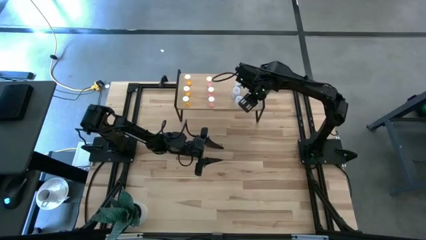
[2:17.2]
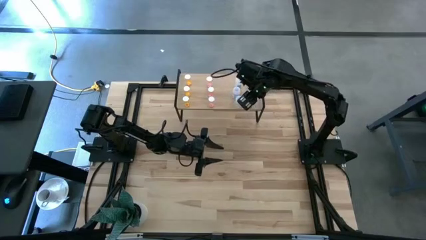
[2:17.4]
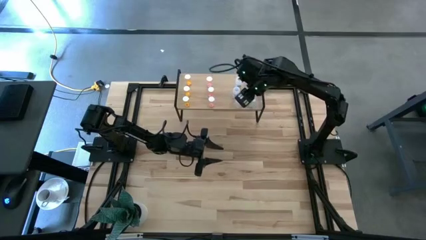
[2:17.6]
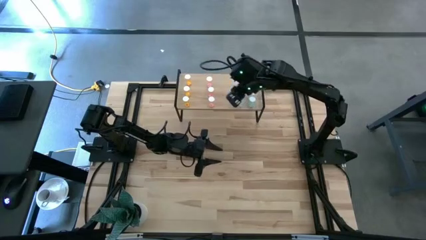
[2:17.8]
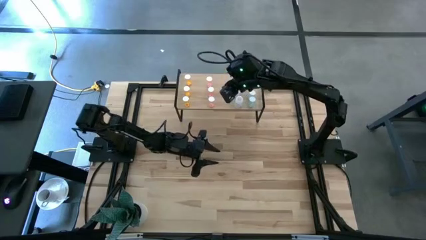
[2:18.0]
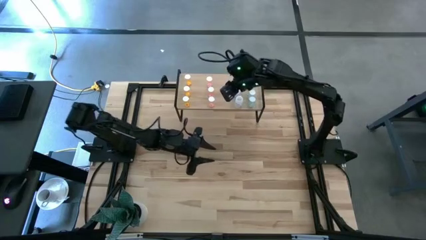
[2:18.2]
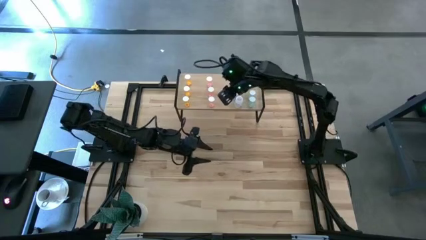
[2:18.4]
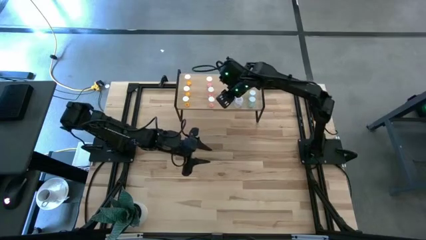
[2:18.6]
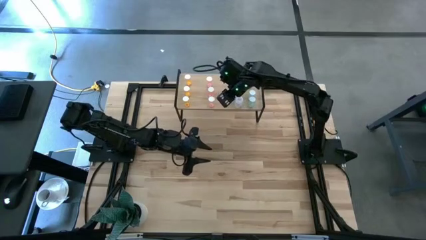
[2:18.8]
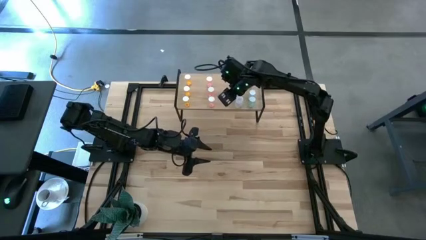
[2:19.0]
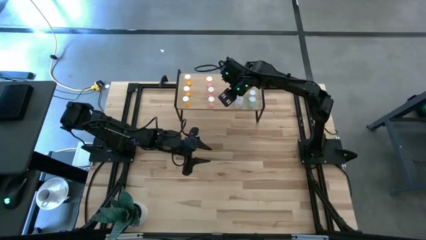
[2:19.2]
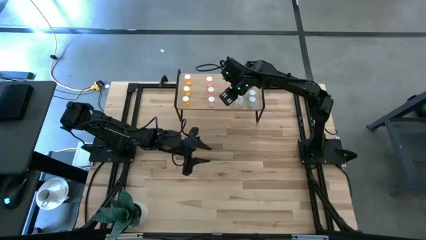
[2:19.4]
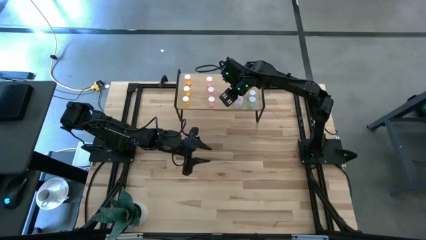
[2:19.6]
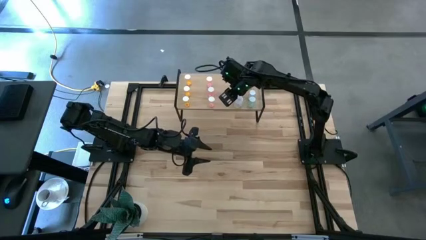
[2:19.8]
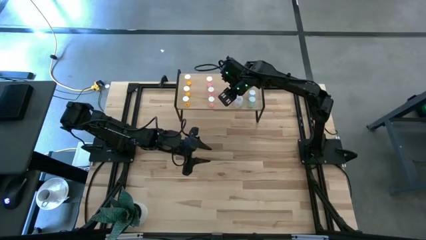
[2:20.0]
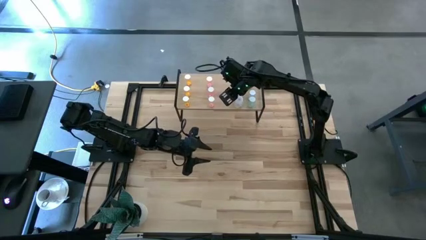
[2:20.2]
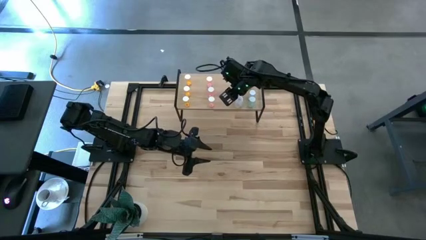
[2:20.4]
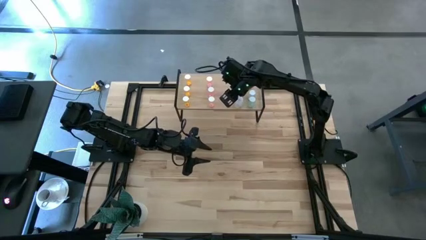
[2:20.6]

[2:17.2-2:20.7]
Task: Pick and place medicine bottles onto shelf by color
Adjust the white pill bottles on the shelf

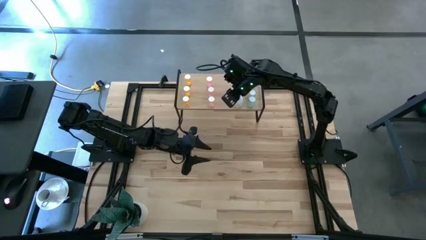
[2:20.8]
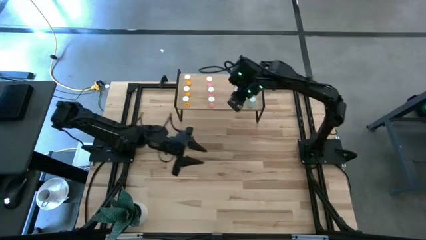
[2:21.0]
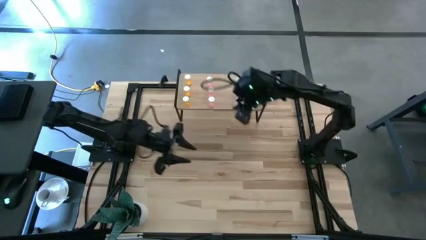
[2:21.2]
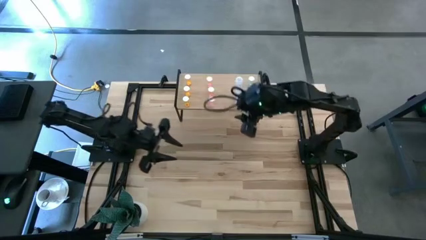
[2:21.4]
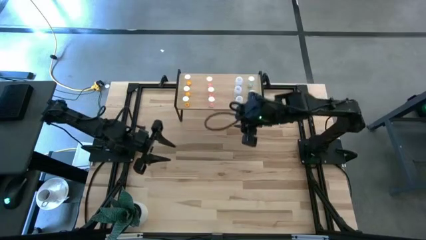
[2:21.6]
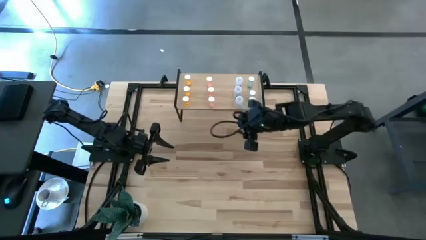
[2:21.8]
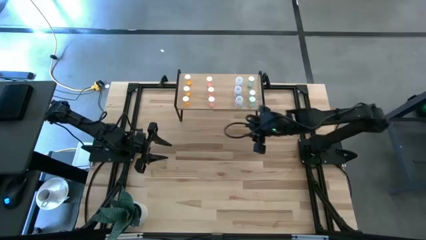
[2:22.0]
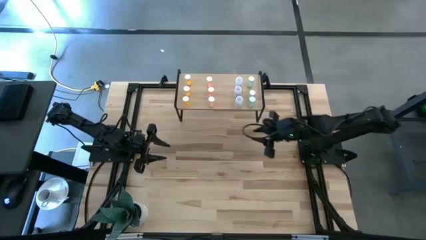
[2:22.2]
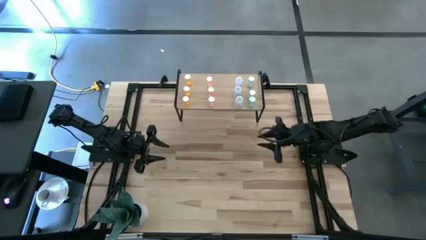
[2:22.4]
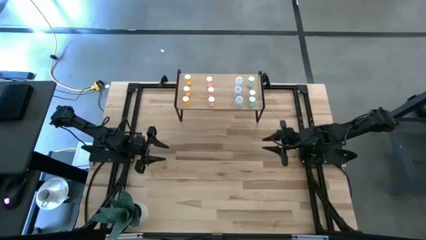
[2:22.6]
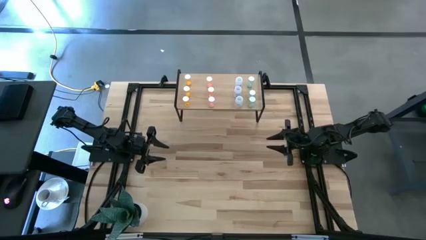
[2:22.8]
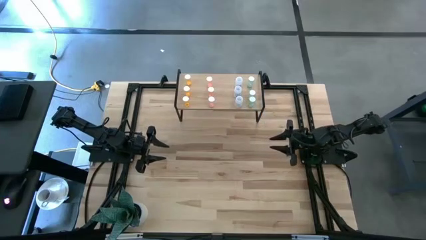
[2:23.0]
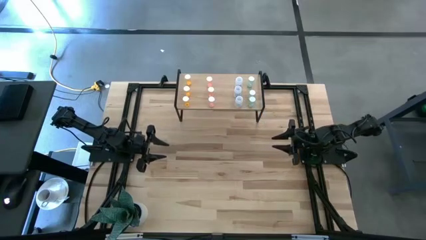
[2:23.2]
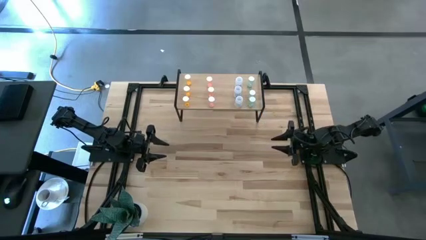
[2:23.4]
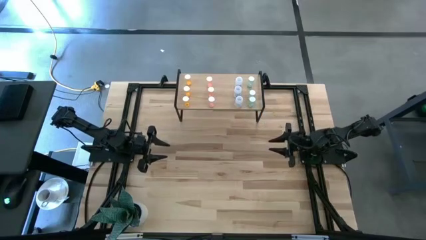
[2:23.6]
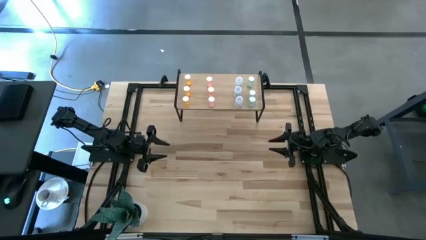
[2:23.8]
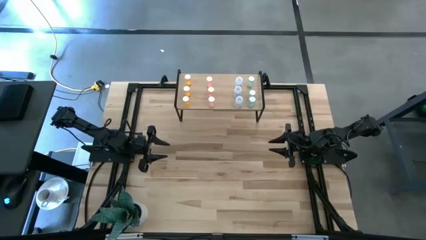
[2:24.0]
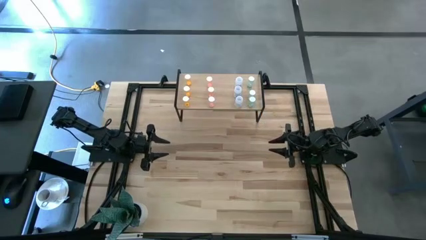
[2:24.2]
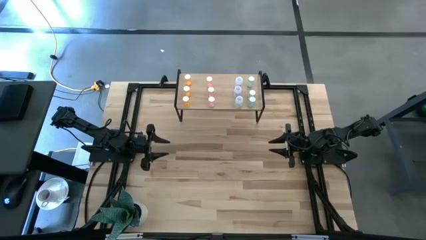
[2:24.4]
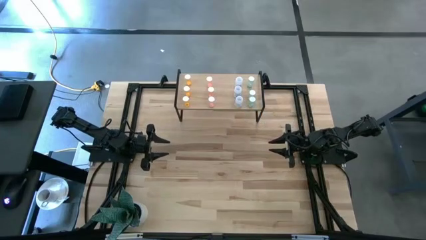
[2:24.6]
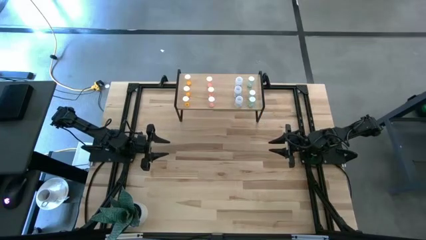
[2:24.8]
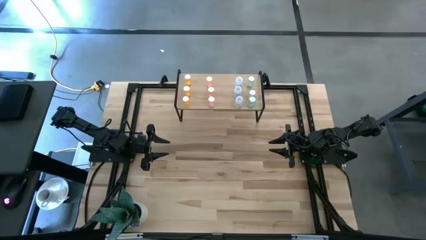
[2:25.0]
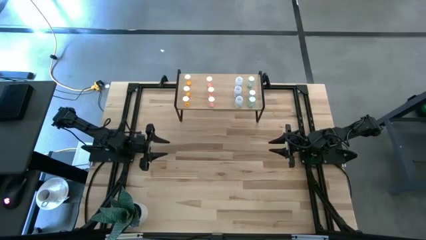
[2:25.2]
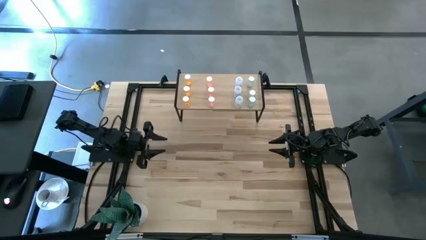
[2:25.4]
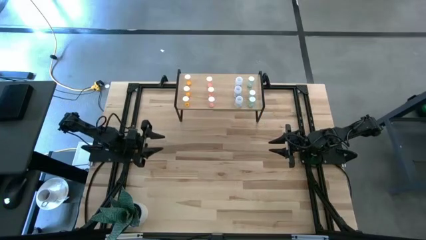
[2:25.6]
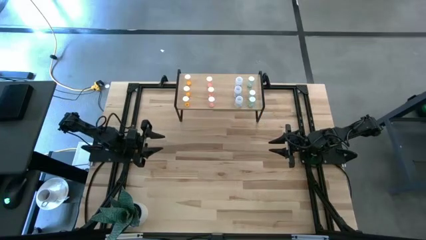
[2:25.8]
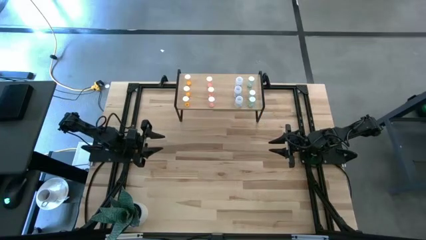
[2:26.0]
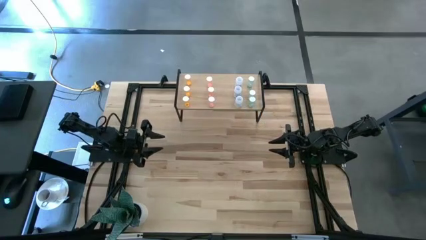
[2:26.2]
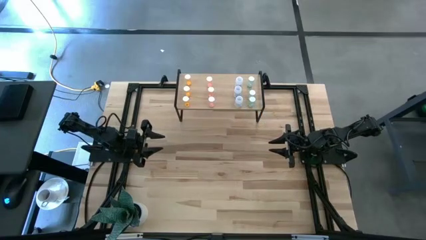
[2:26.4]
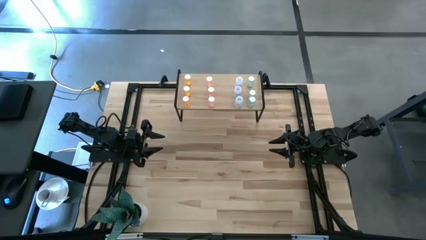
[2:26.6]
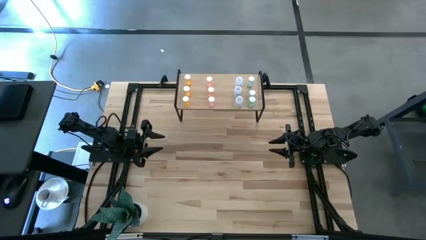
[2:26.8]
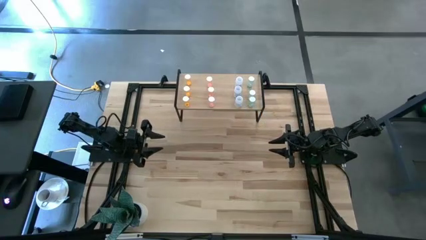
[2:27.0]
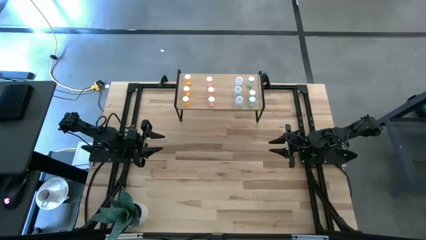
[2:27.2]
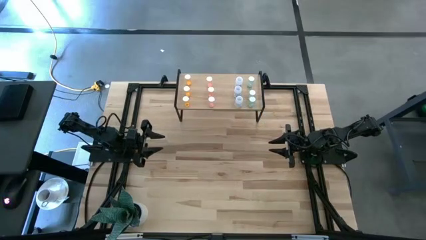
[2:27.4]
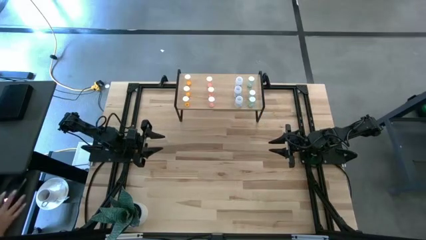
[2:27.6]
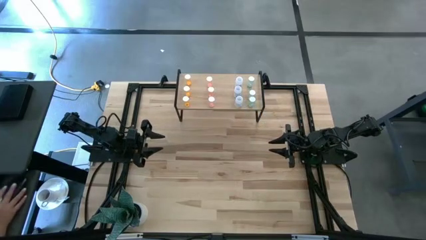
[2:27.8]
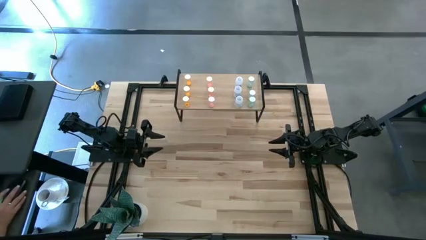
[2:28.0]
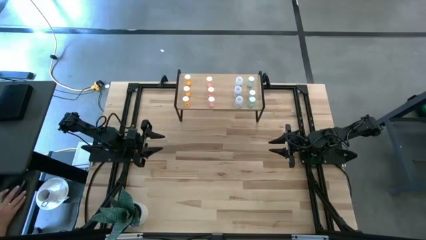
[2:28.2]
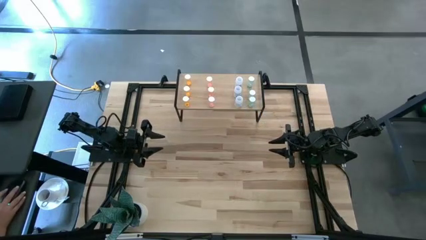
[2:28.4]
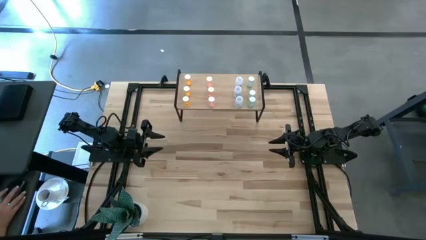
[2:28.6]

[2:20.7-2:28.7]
Return to Home Position

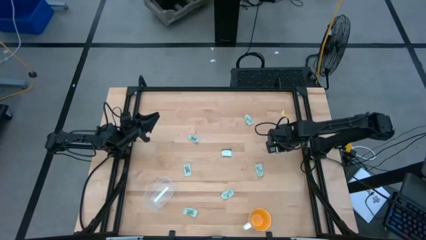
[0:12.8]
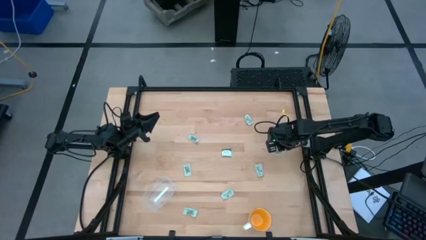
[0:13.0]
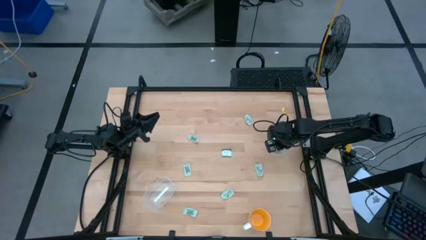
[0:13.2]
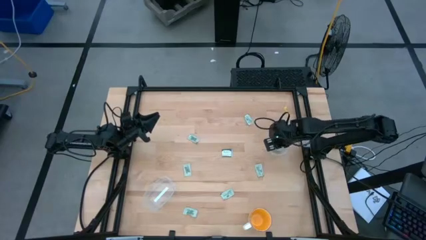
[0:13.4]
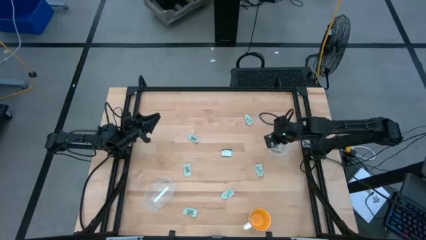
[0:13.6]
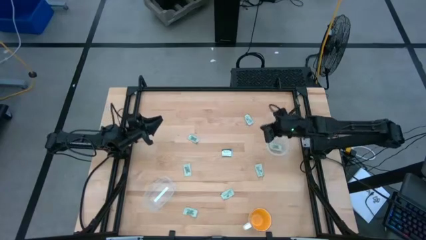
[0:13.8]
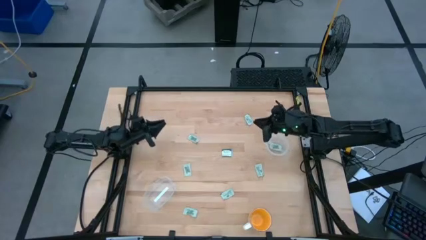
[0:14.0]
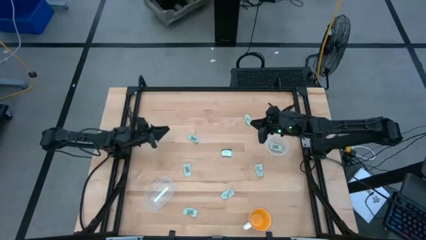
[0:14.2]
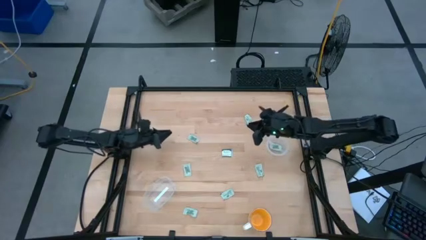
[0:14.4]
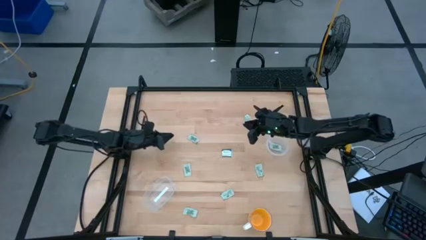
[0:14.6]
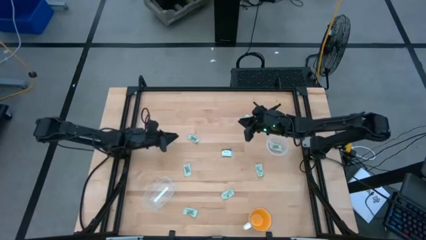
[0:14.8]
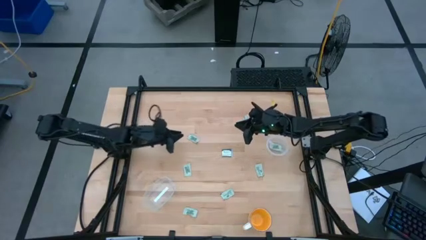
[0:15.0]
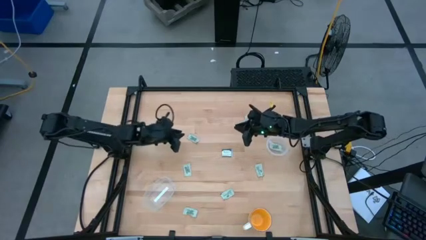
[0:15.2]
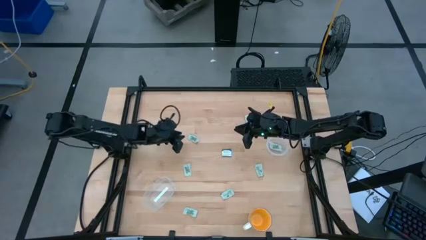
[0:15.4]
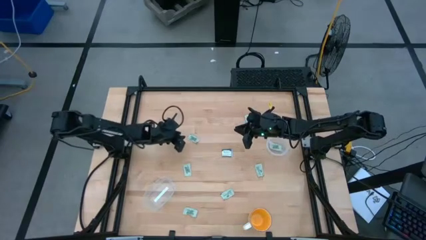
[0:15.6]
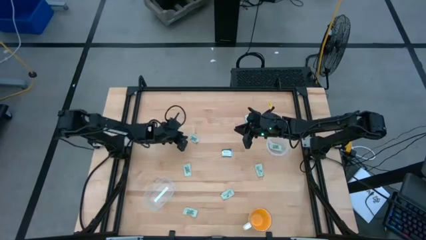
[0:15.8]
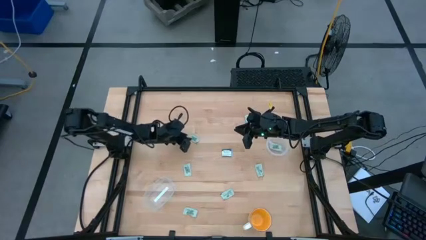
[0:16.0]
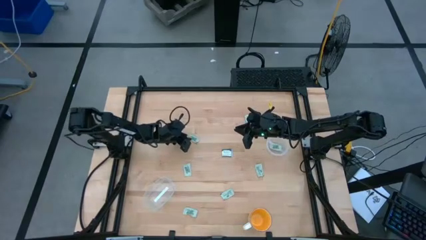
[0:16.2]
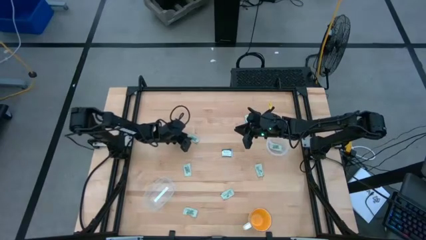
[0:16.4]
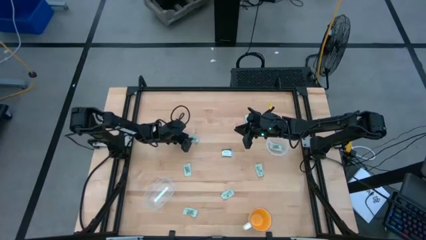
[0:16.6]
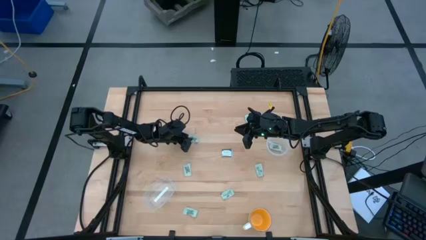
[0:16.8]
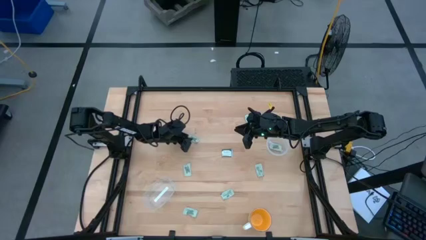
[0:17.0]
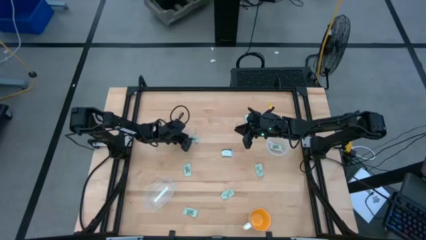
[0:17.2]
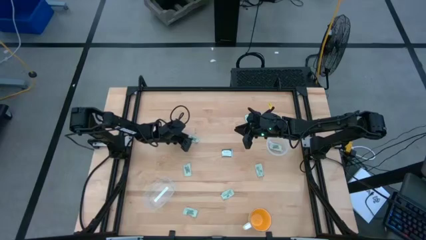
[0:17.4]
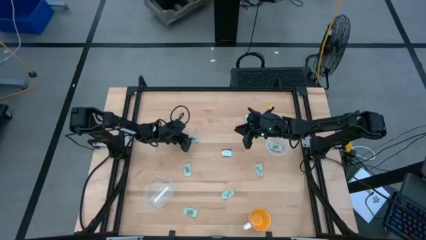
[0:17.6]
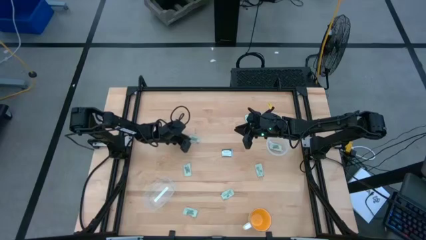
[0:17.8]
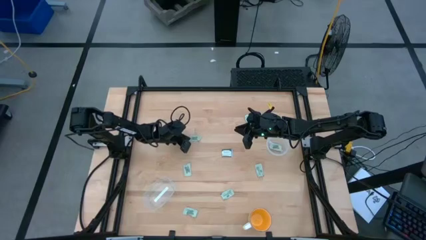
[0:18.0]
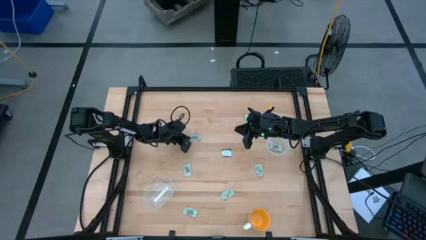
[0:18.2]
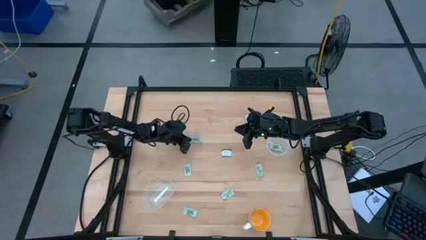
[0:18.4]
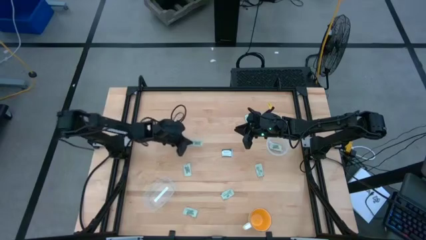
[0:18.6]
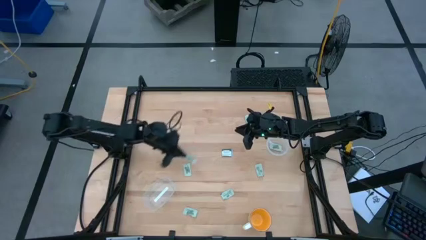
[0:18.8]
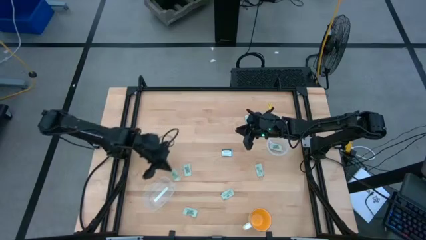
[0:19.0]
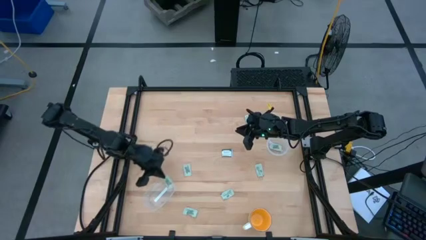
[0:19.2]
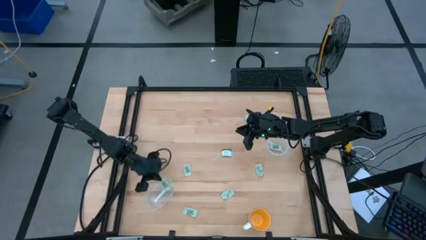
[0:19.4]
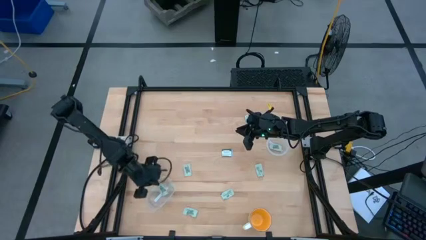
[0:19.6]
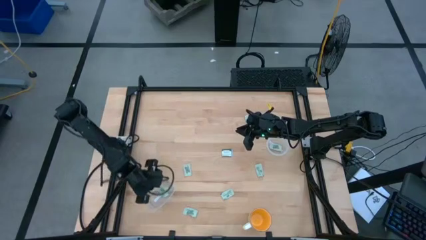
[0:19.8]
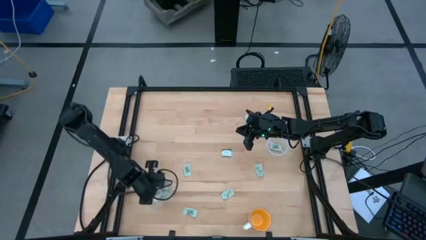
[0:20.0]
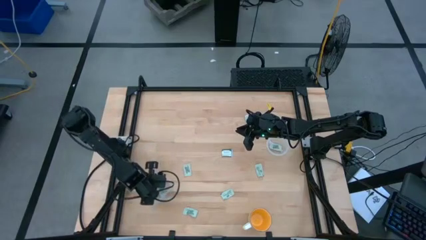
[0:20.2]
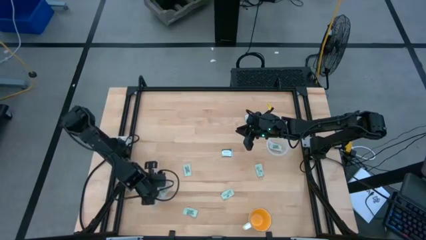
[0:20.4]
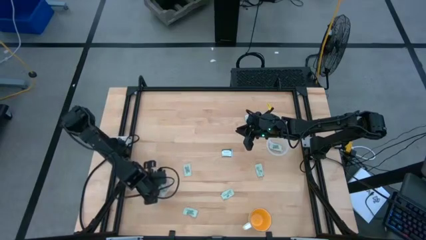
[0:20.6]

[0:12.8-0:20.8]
Task: Pick and place Stevia / Truvia into bins
Put the white stevia packet into the rectangle transparent container
